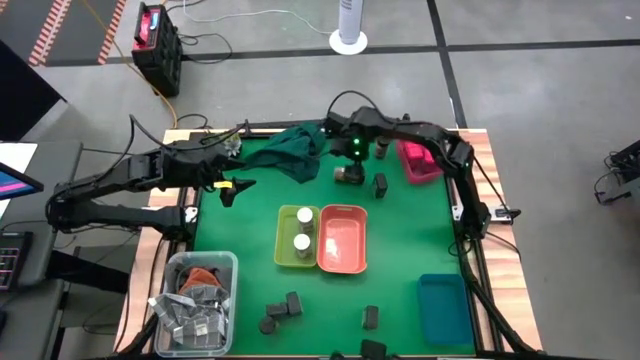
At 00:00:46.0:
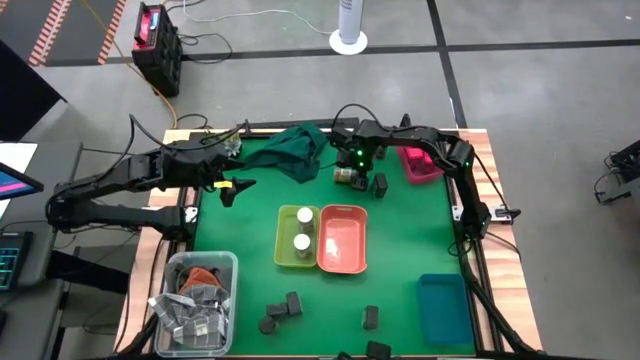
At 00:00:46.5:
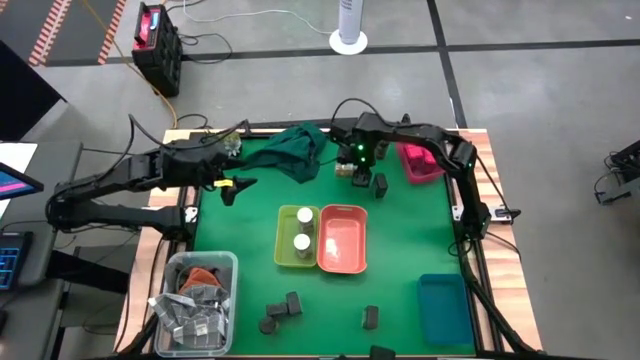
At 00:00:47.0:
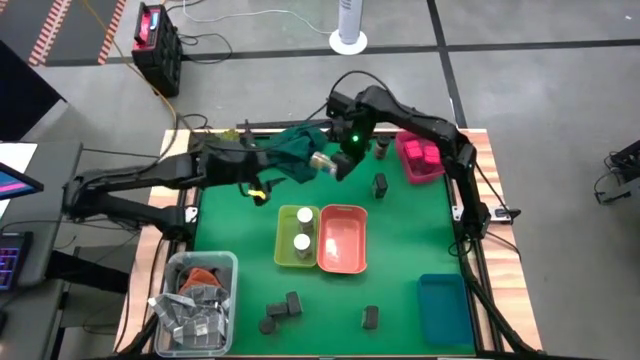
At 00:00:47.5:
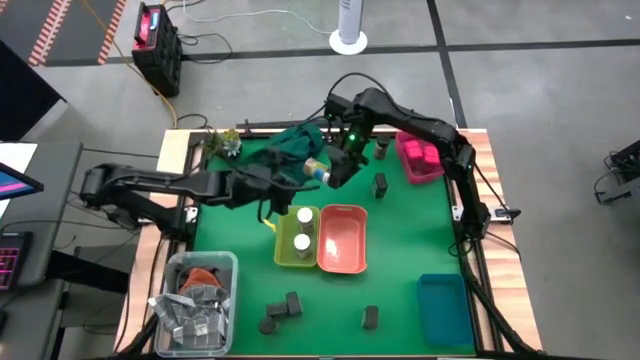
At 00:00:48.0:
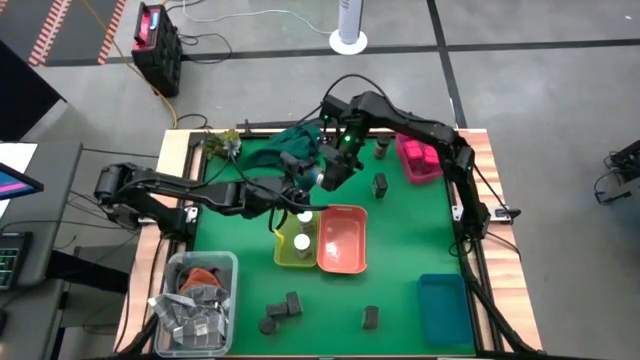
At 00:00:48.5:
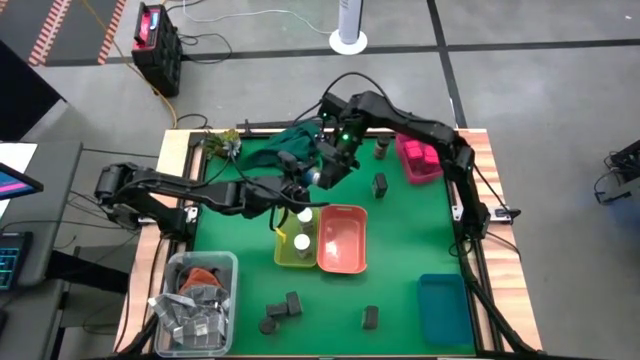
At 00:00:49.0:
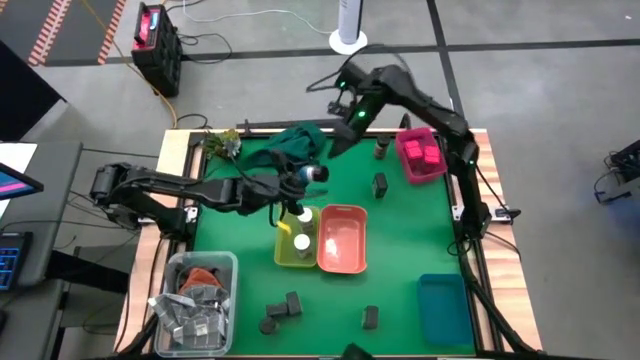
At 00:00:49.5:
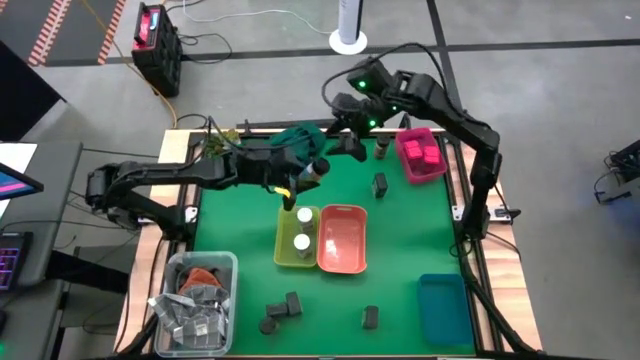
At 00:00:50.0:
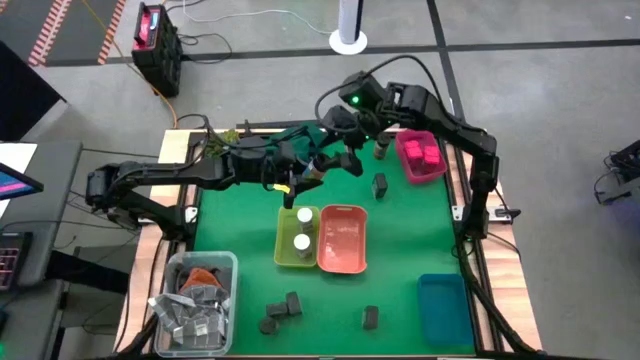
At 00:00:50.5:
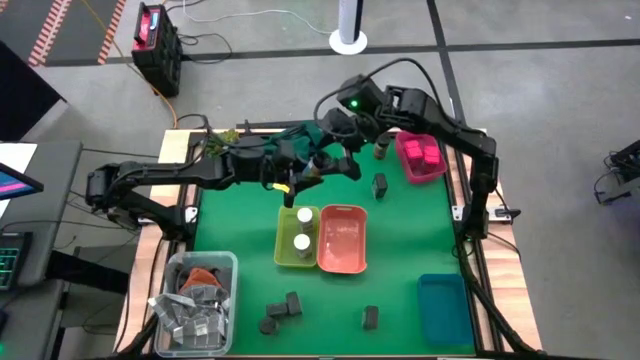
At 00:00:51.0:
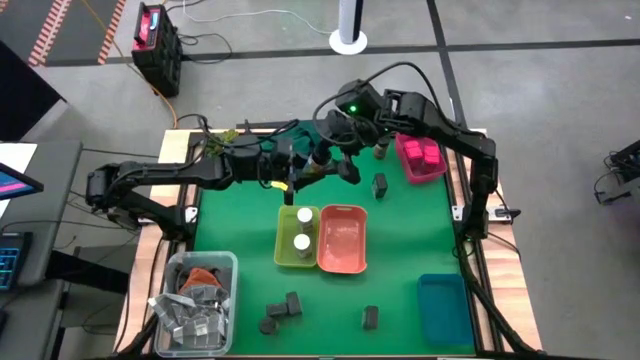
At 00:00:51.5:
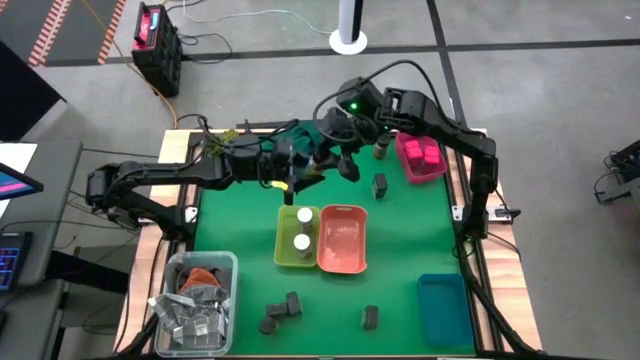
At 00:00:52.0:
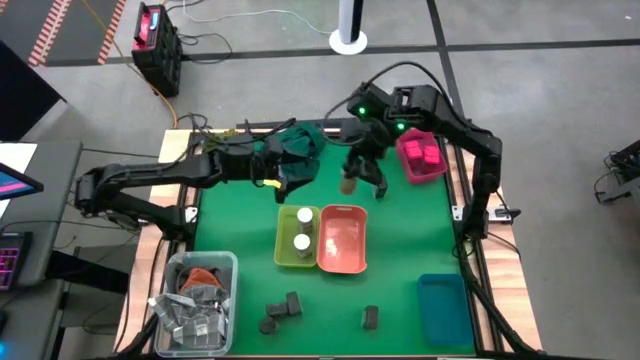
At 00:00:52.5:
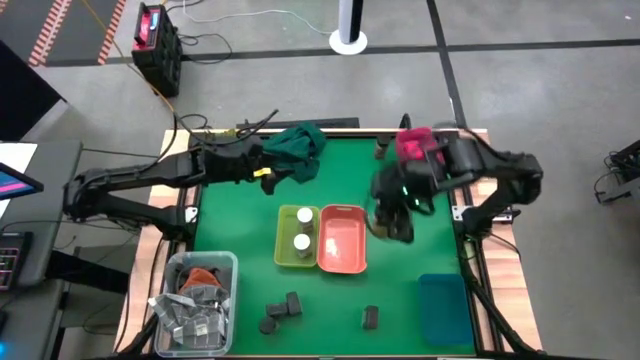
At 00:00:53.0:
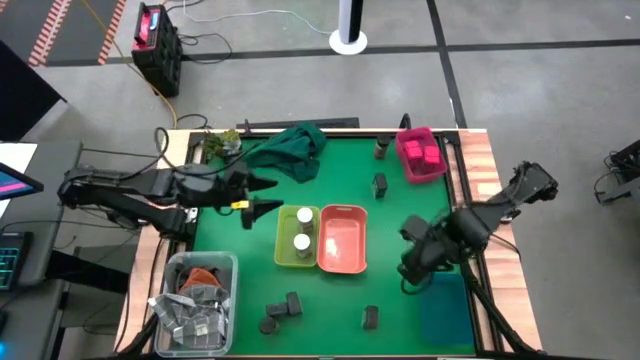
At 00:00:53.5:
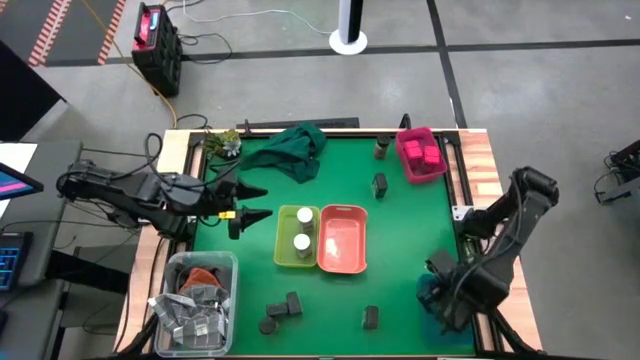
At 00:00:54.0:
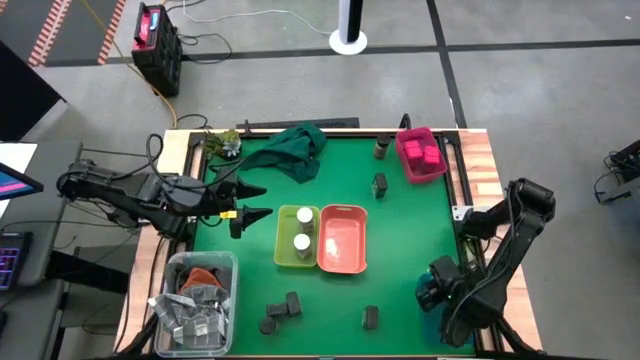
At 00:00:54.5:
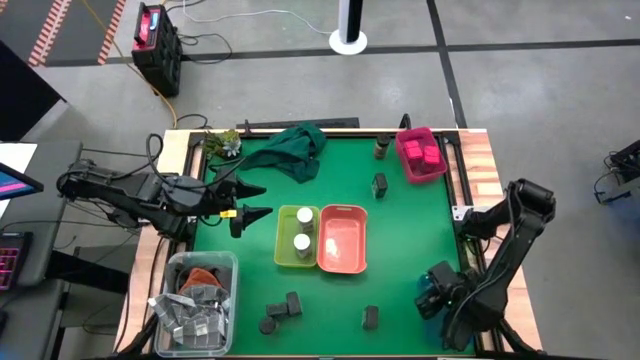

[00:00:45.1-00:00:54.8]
Task: Sort spices by type
Put the middle black seasoning bottle into the blue bin

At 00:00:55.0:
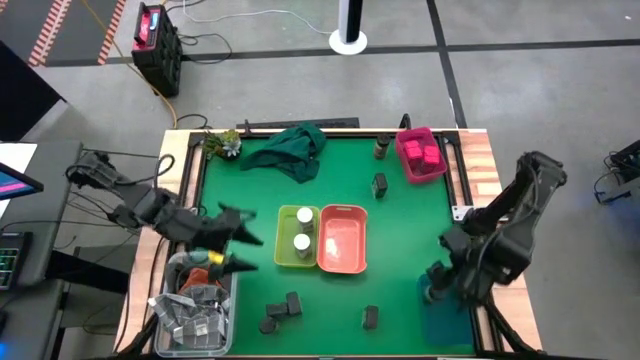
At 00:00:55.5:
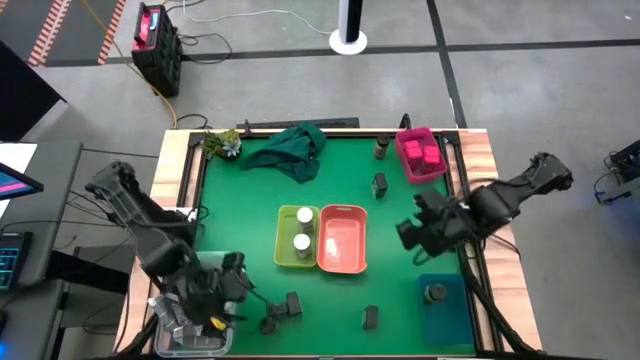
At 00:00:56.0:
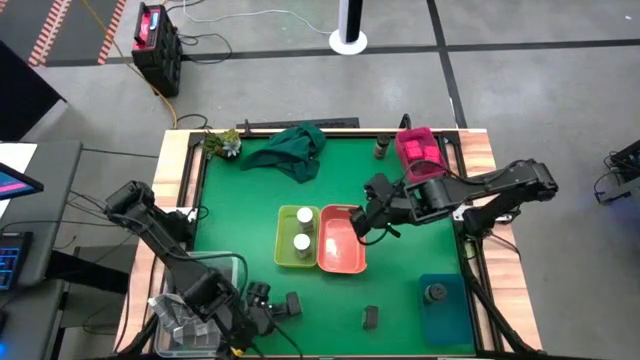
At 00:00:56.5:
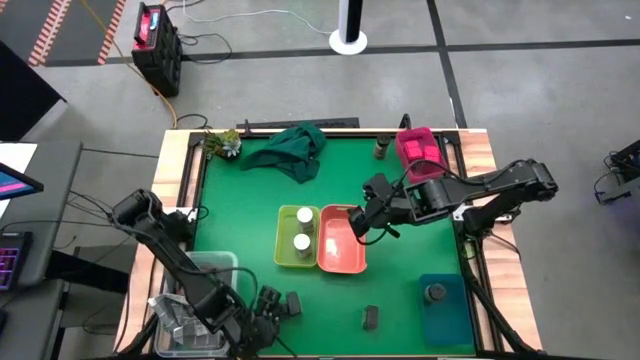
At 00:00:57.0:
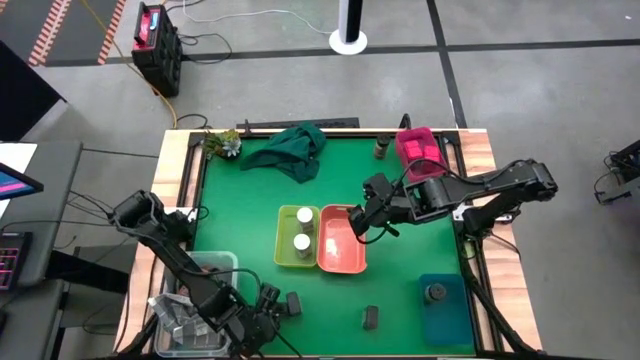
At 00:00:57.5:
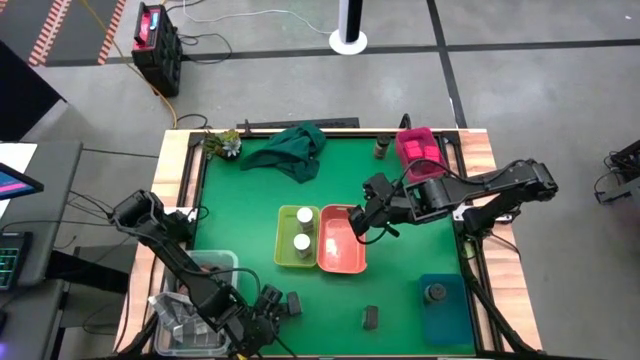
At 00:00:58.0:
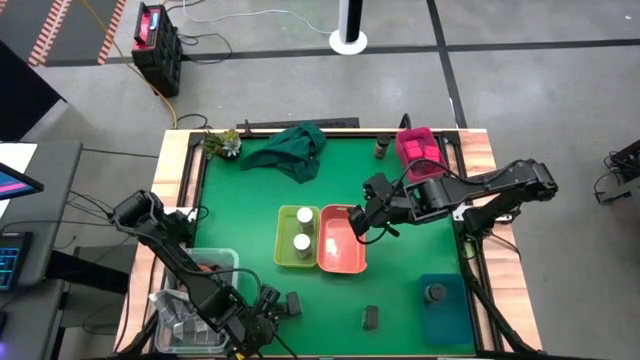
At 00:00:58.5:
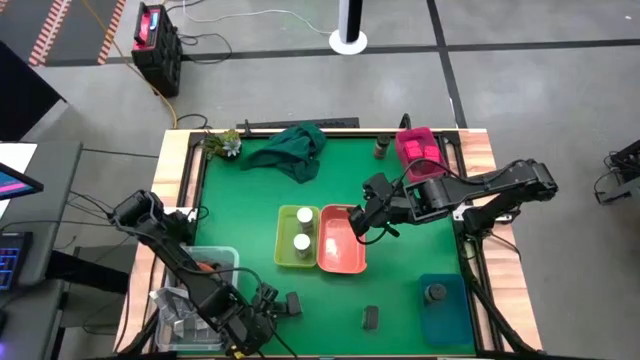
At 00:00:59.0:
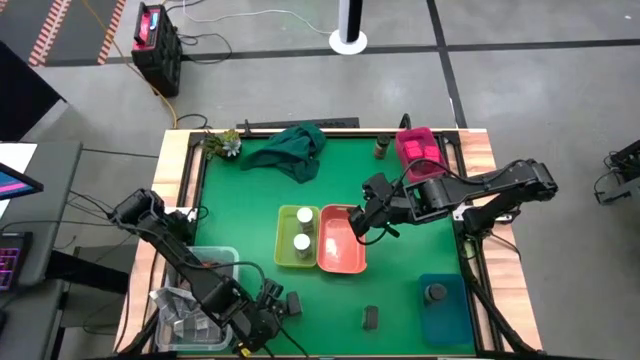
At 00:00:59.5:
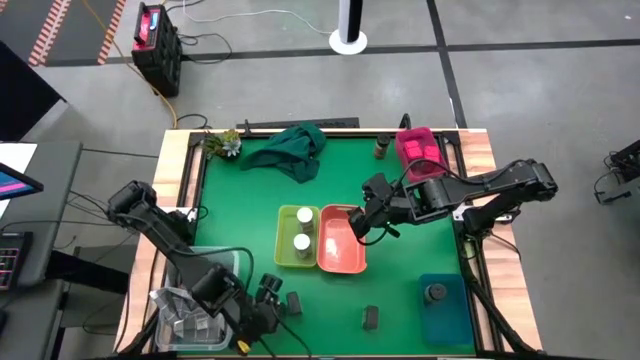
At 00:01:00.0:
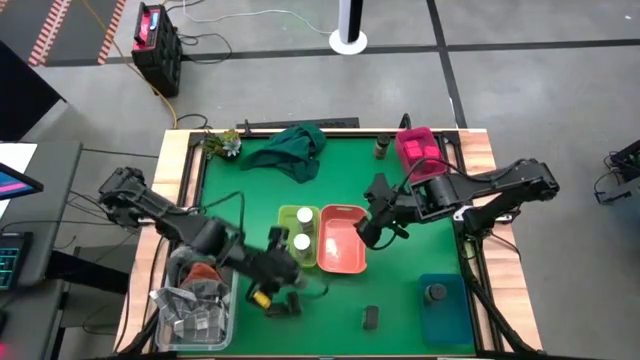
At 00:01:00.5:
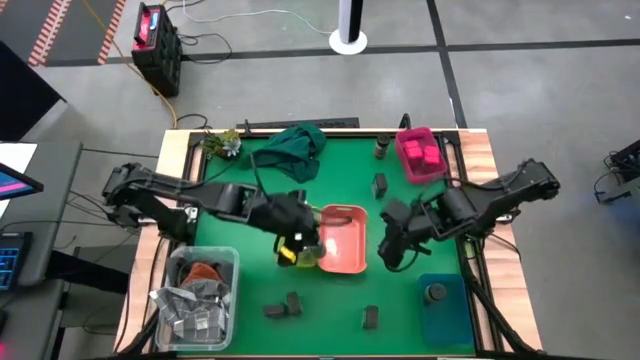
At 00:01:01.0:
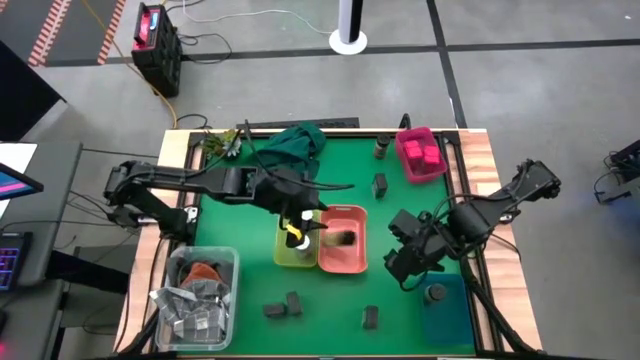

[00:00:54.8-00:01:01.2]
Put the bottom black seasoning bottle into the blue bin

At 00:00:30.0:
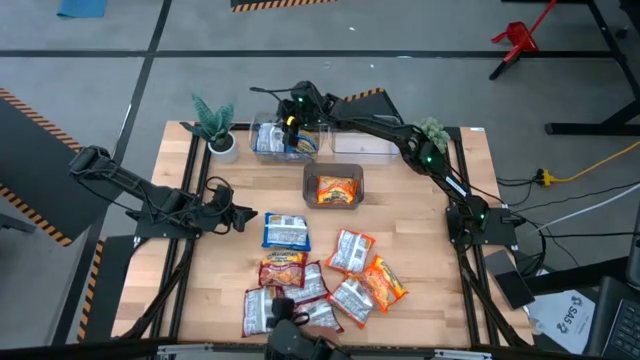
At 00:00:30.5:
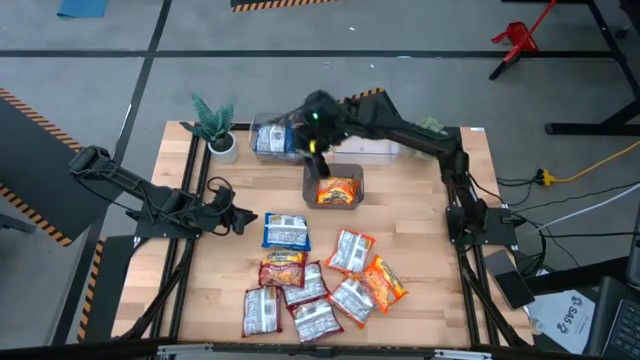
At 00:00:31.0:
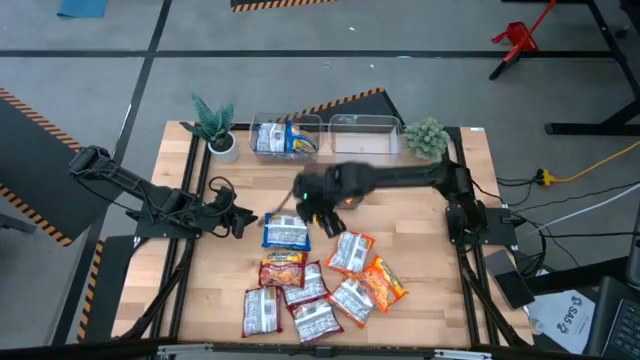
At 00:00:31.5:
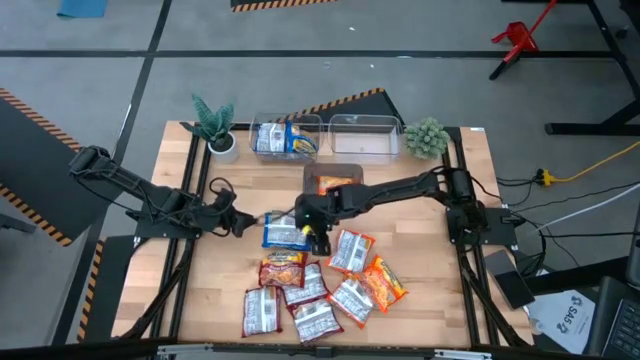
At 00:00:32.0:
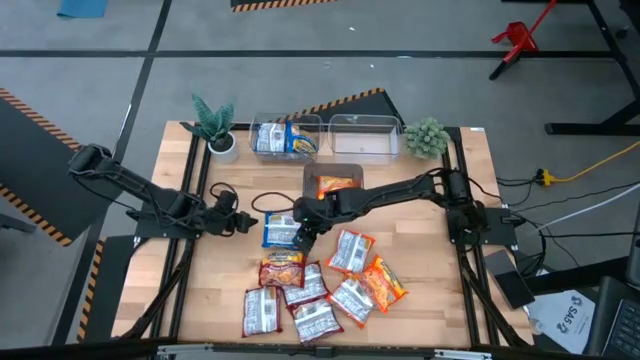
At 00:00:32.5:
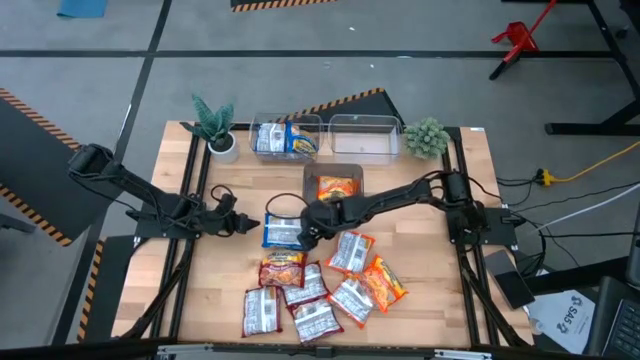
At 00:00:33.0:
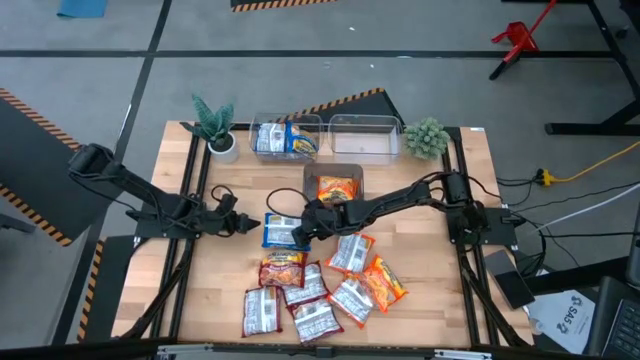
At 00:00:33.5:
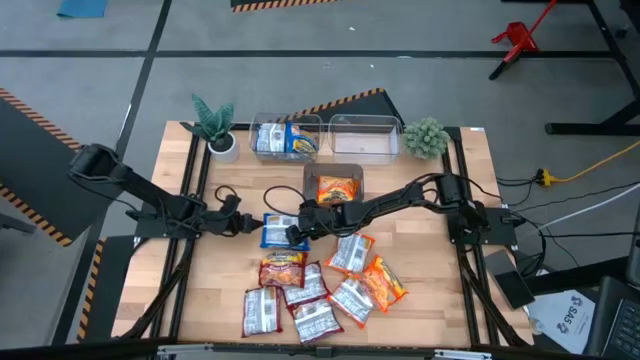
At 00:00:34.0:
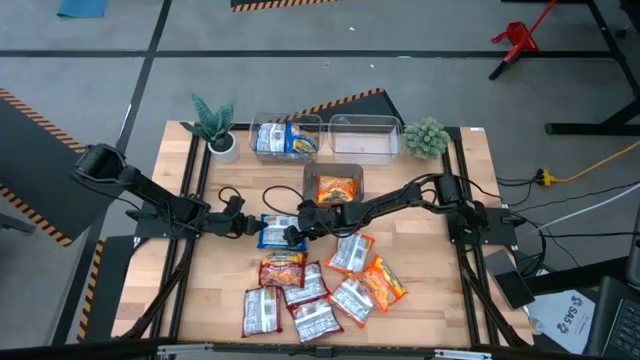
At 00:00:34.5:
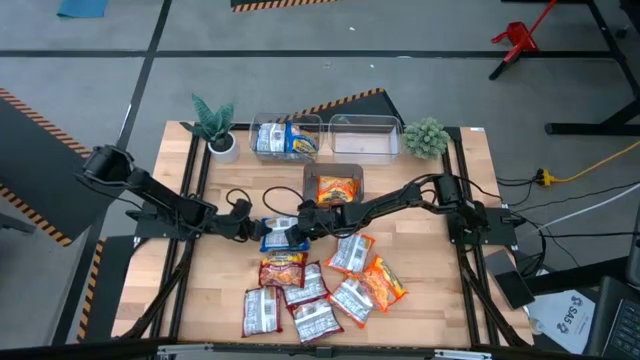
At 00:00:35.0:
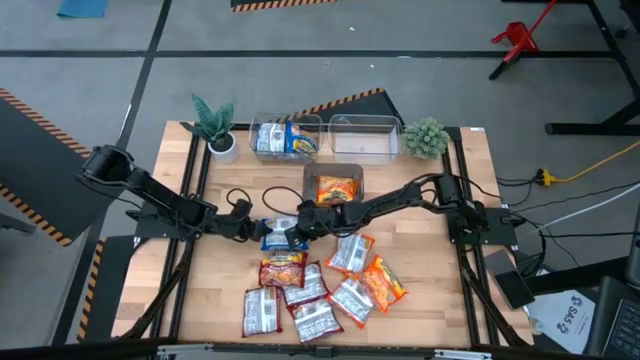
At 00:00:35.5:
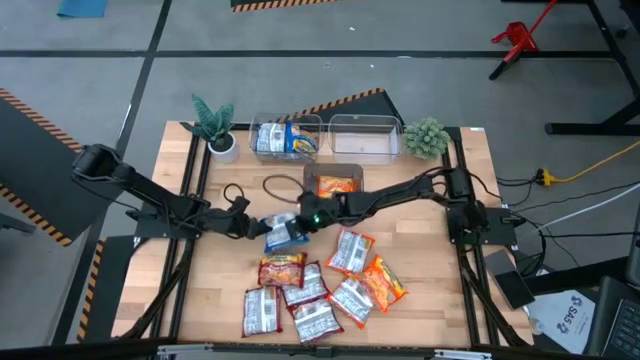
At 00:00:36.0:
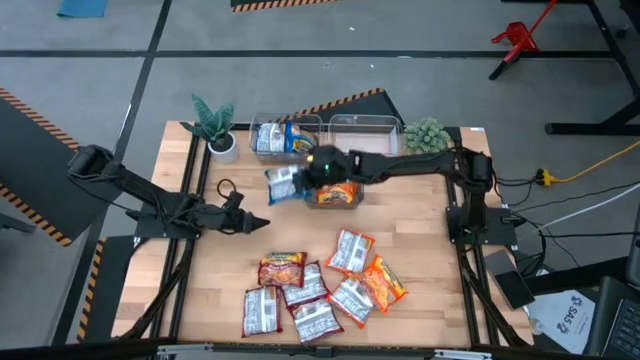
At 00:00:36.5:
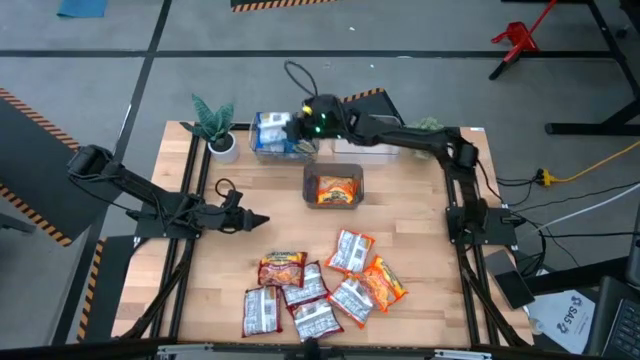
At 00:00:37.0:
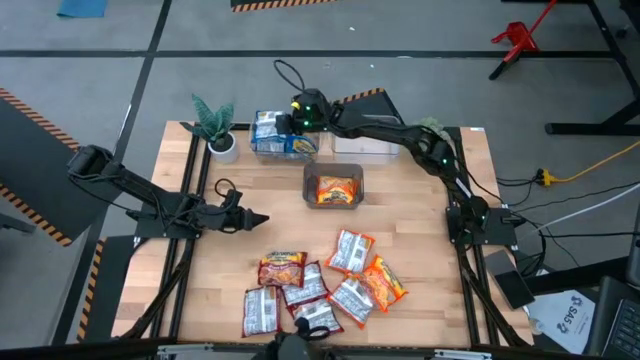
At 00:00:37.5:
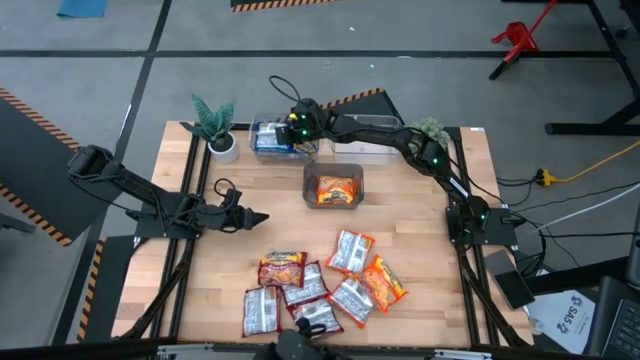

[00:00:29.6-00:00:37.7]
Task: Sort Maruchan noodles
Put the blue noodle pack into the left transparent bin
